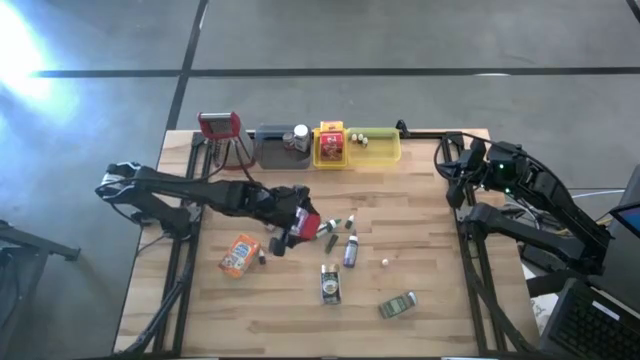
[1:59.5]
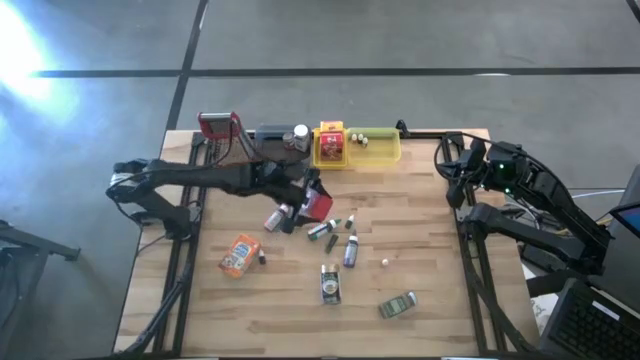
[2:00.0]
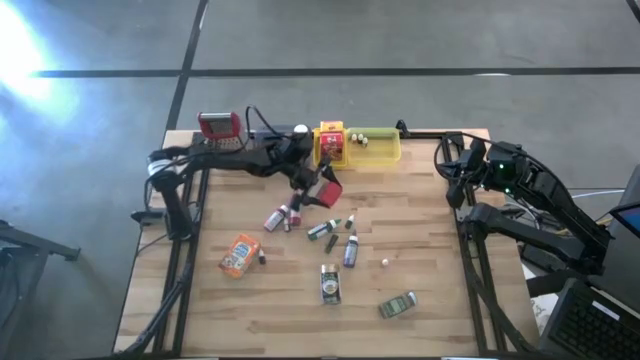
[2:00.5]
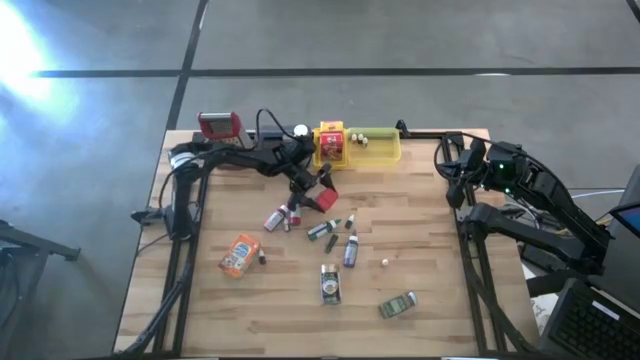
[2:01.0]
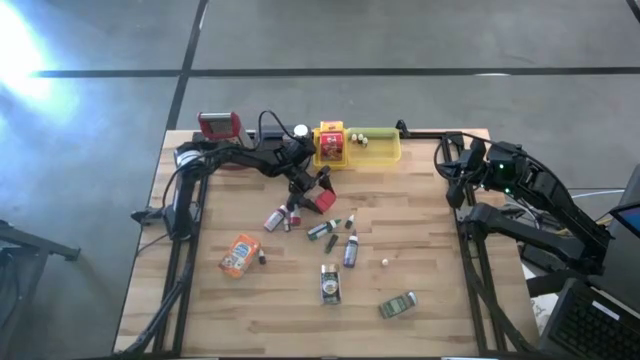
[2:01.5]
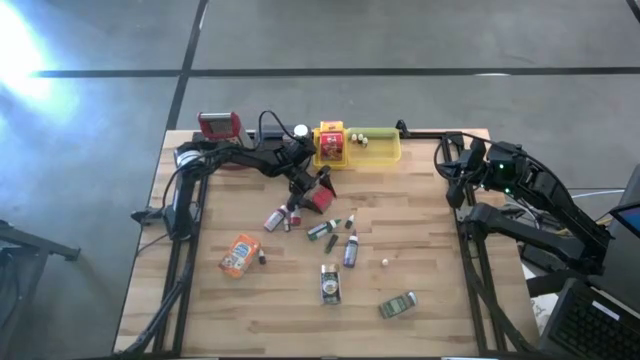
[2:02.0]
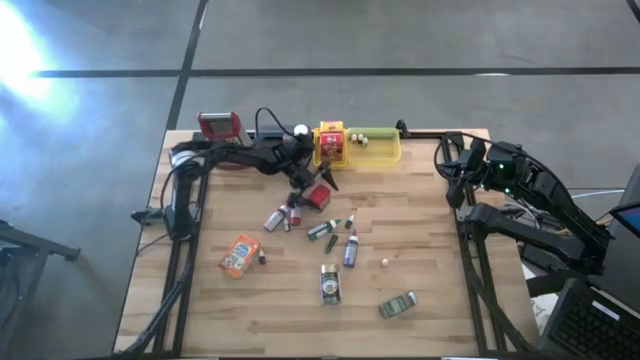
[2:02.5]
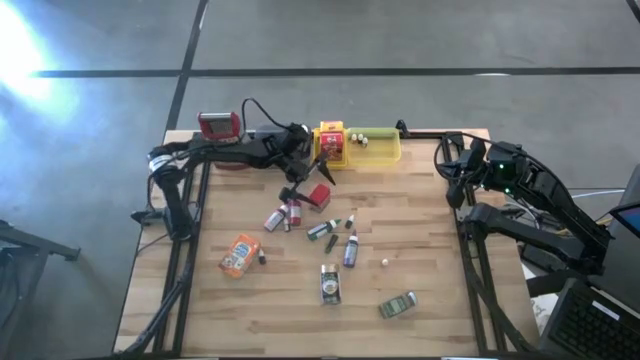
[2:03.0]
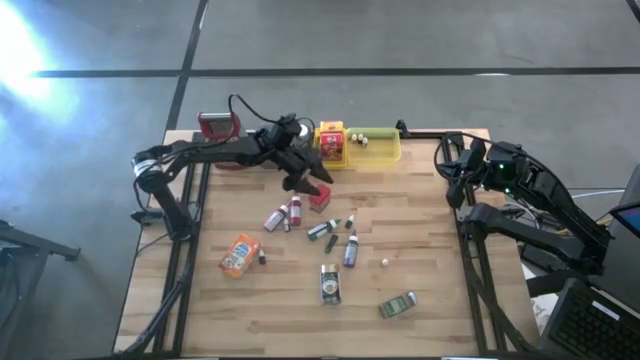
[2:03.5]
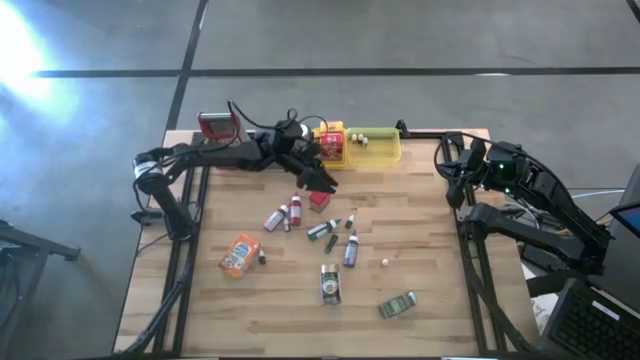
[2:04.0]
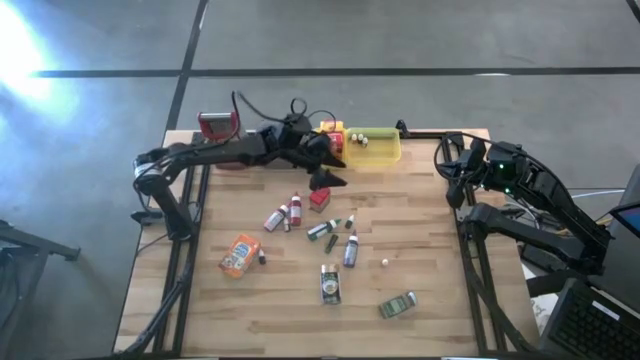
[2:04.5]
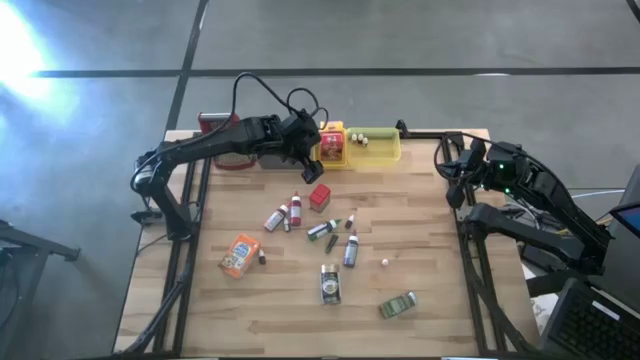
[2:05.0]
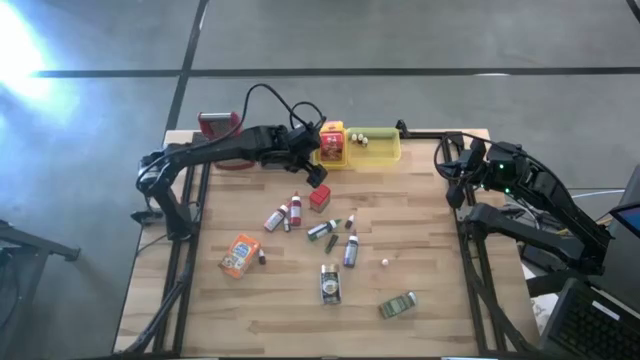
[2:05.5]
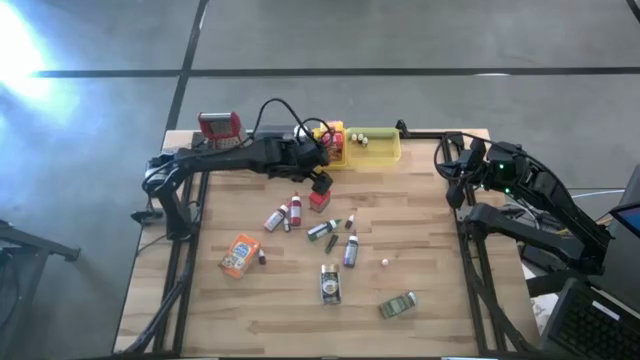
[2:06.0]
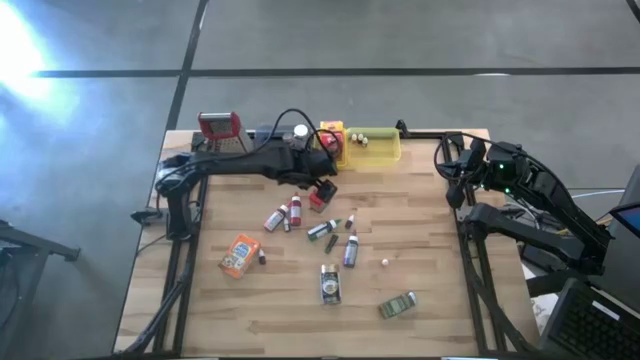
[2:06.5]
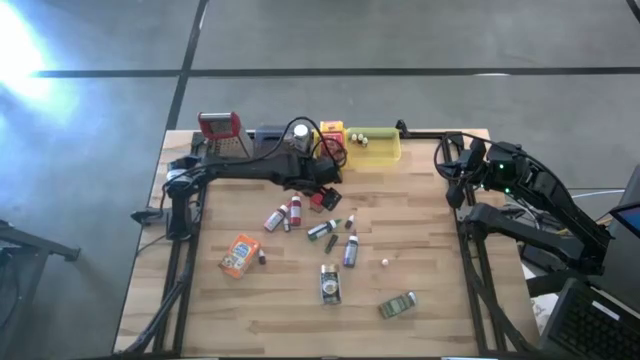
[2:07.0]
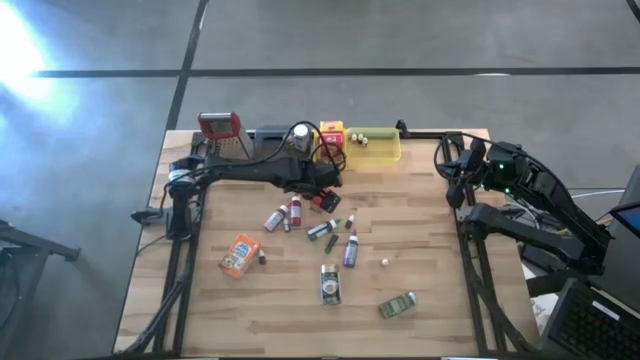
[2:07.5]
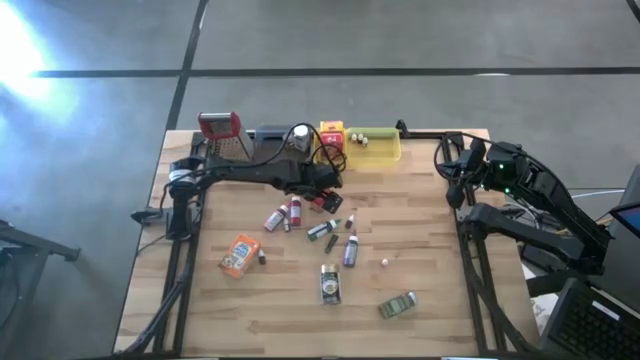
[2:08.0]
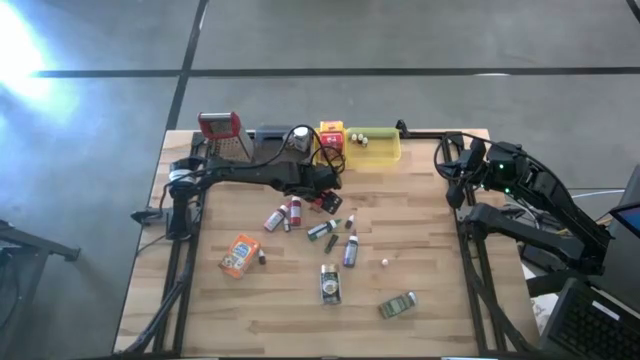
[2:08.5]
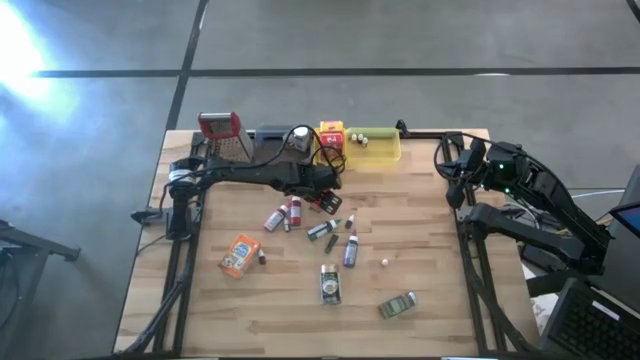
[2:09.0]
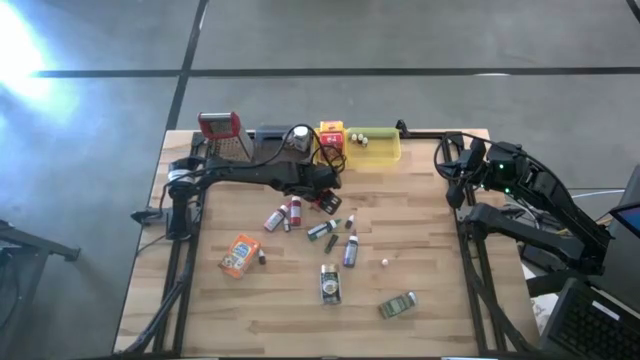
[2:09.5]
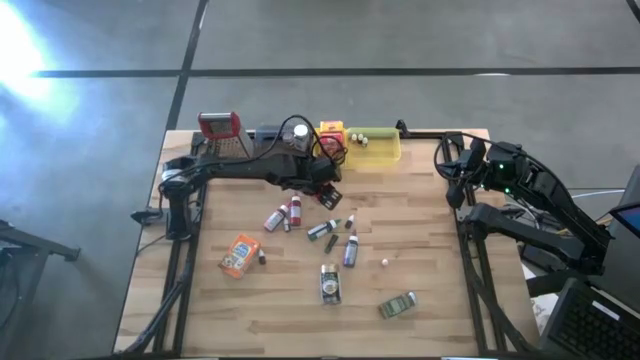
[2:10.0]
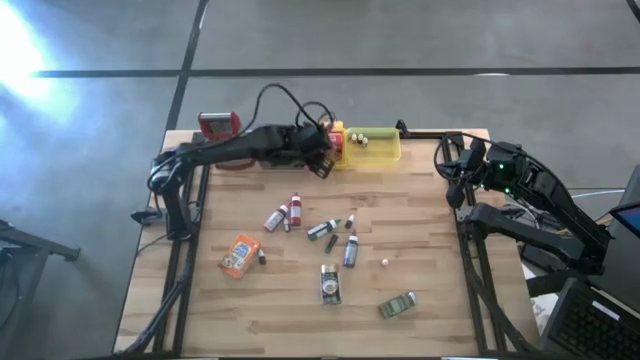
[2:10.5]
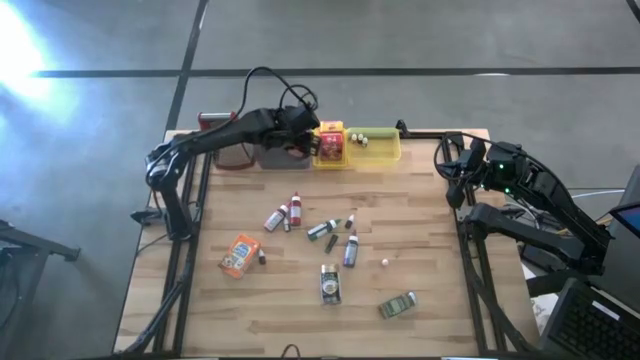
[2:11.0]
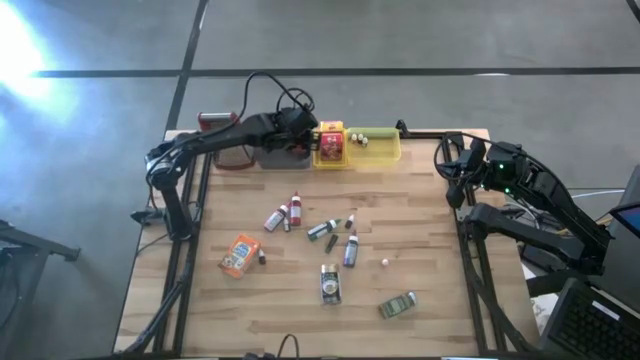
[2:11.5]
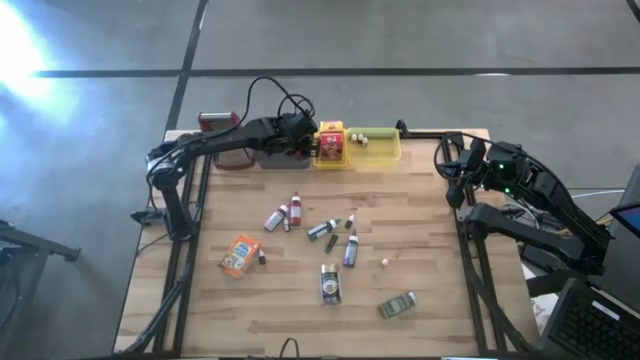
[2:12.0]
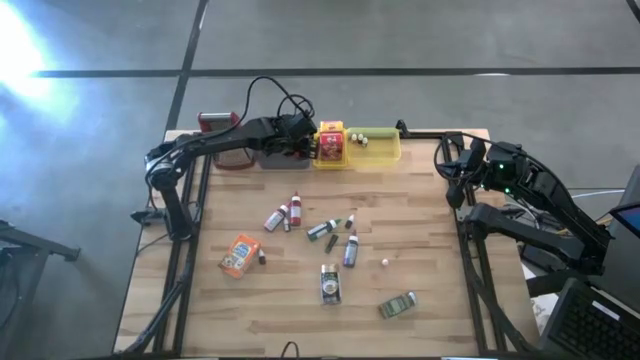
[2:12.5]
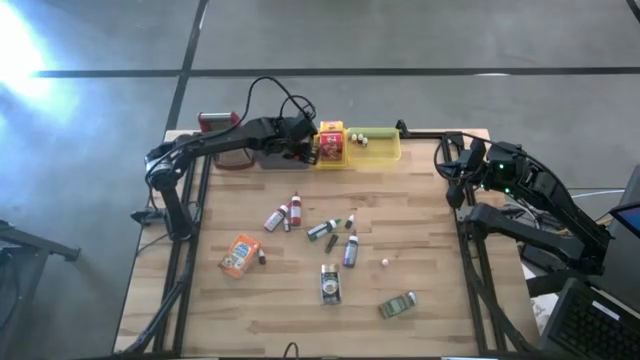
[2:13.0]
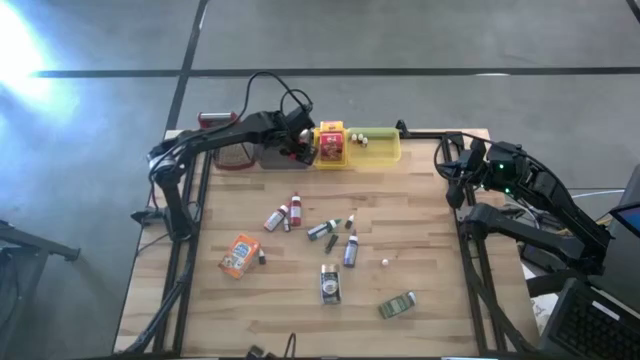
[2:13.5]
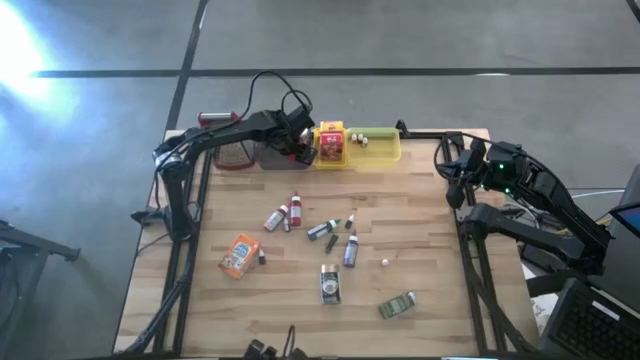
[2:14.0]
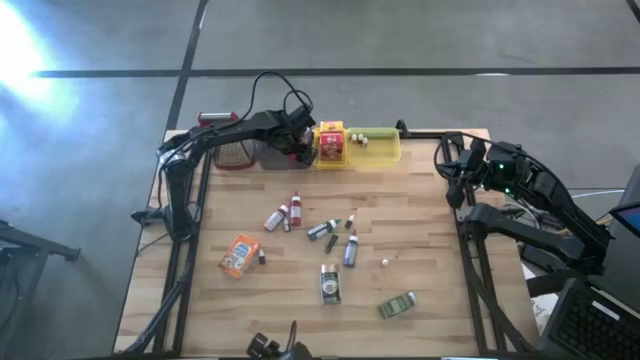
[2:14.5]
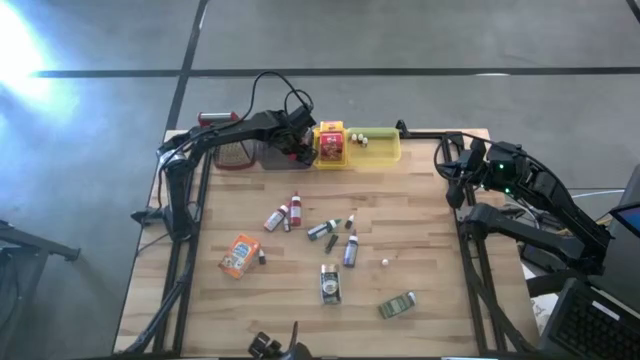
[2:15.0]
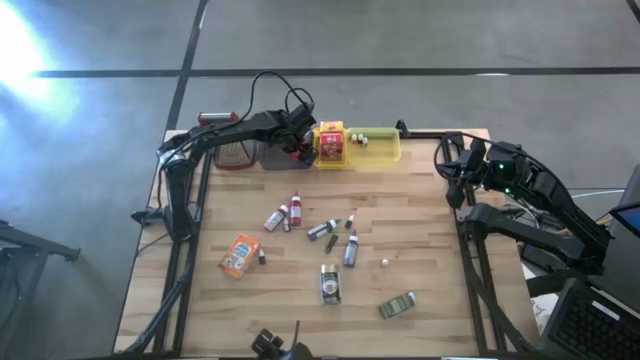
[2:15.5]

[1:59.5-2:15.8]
Task: Pick & Place Kitchen Items
Put the red seasoning can into the black bin
